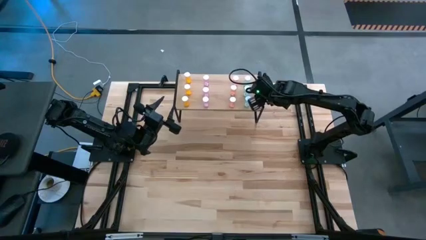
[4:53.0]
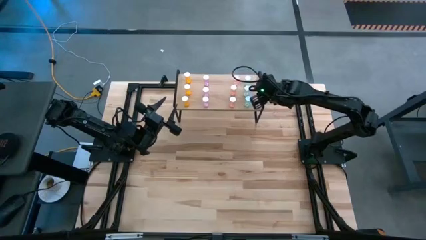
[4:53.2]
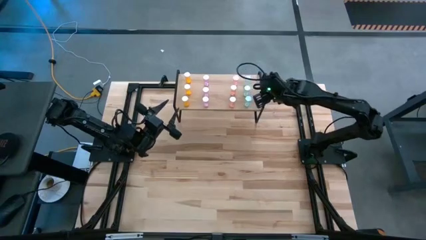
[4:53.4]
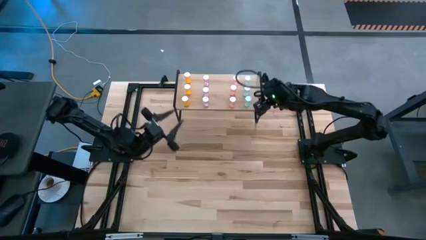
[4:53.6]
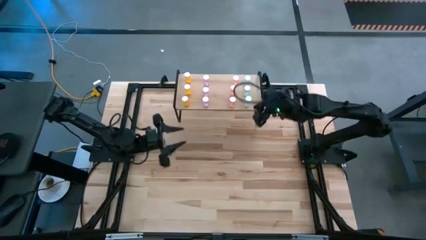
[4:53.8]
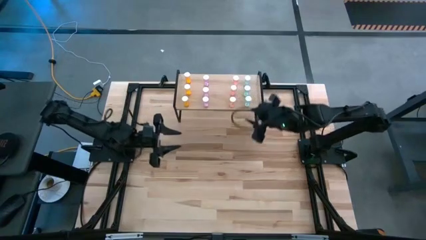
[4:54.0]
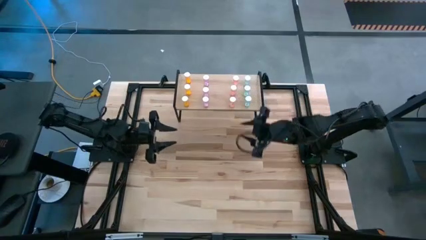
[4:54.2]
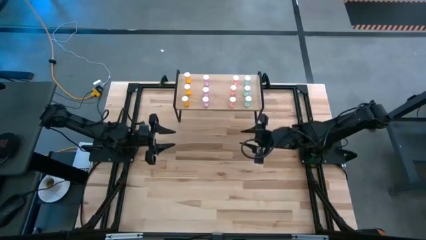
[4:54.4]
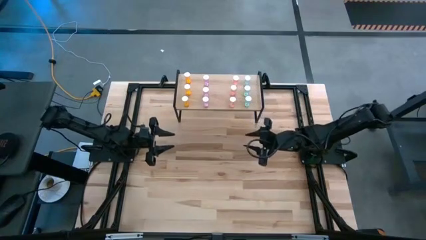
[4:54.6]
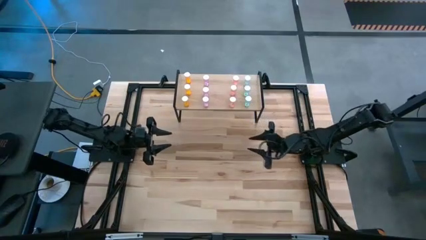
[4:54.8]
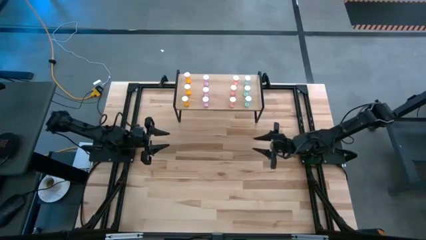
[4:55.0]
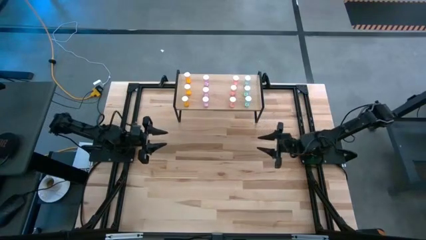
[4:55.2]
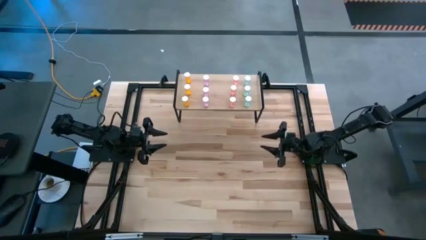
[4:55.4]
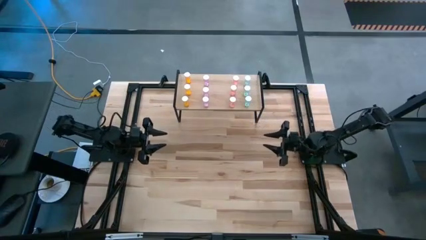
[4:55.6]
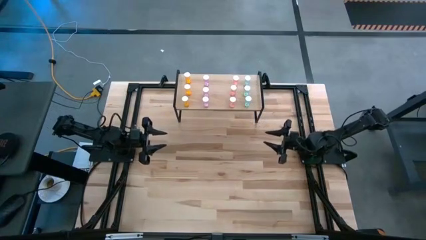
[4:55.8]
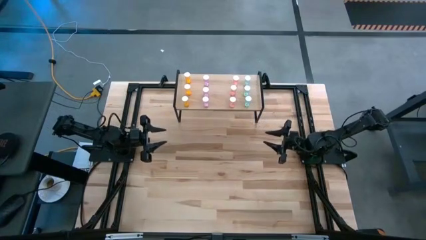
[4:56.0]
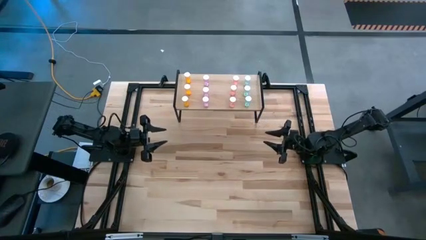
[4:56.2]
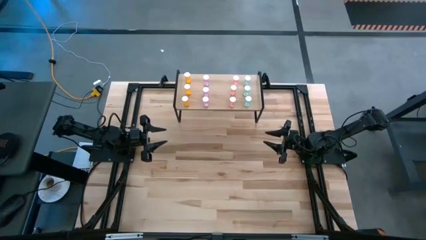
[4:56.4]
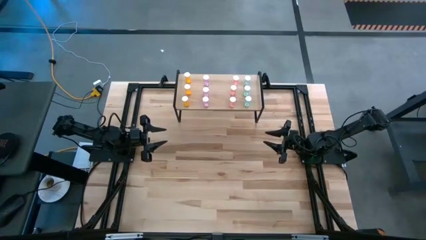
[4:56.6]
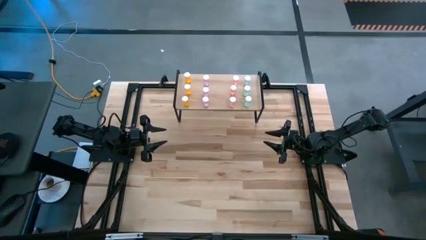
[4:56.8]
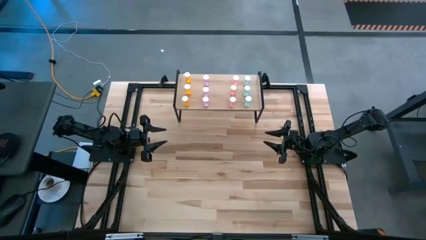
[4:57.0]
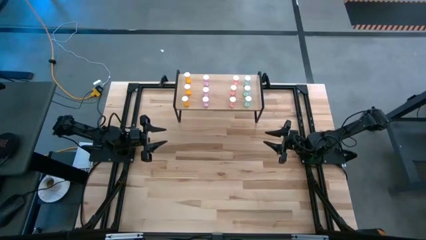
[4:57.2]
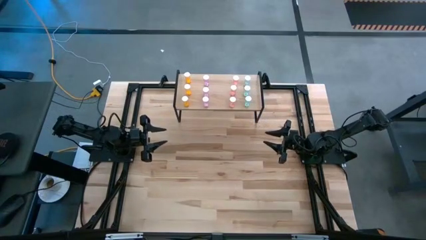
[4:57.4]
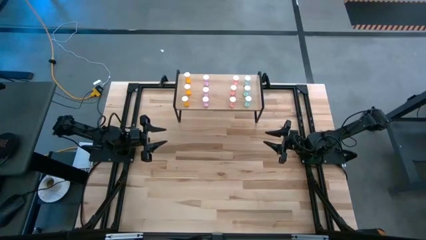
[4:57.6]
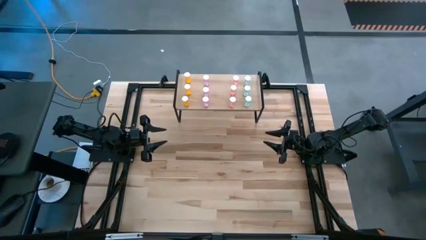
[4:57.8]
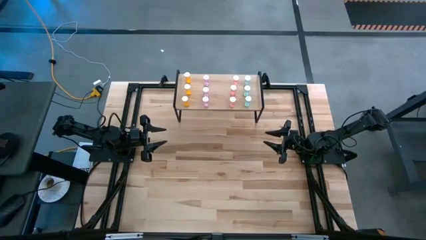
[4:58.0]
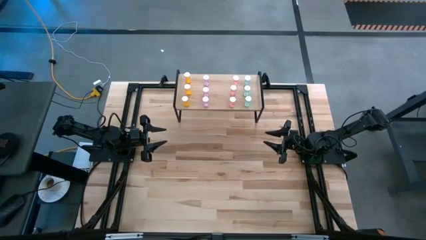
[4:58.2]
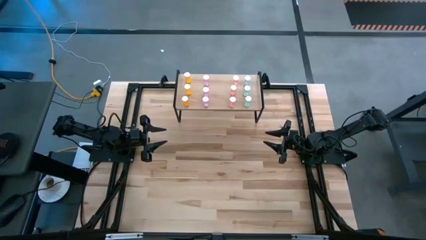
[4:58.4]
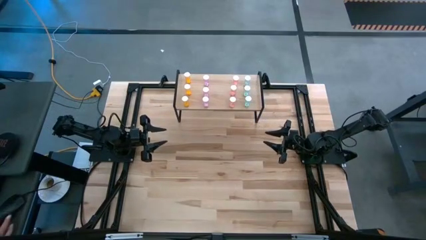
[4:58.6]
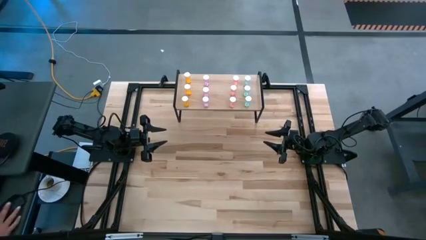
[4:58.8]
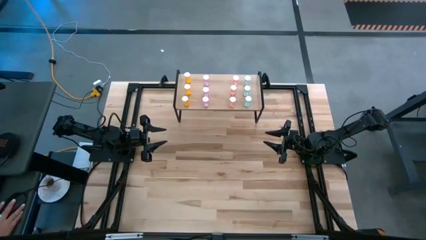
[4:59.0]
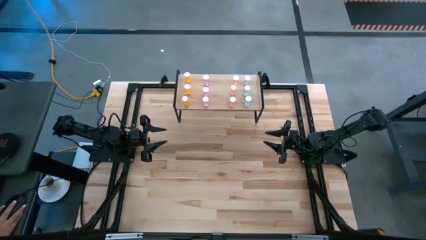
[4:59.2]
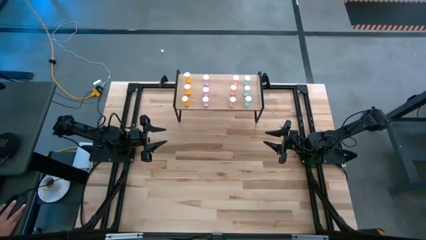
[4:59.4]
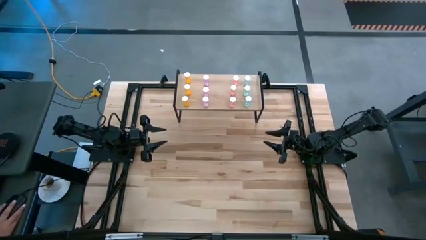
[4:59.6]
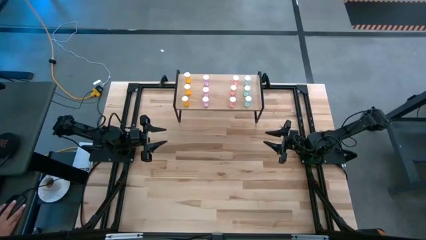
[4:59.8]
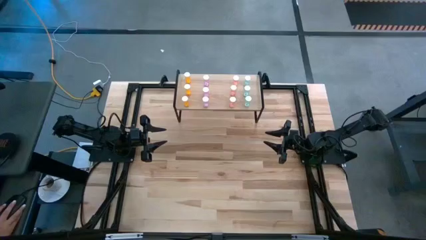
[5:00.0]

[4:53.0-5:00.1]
Task: Pick and place medicine bottles onto shelf by color
Return to Home Position

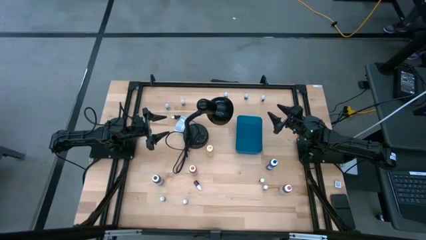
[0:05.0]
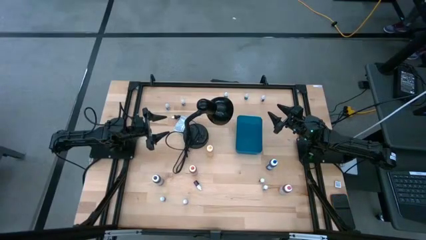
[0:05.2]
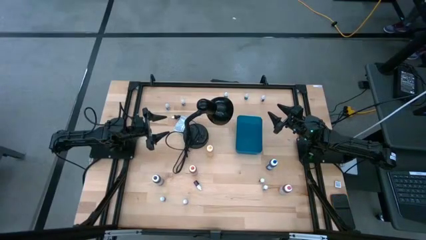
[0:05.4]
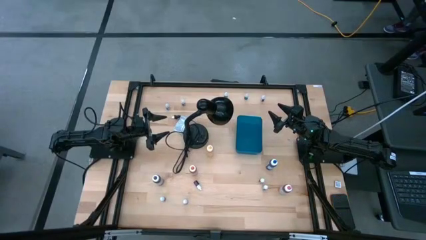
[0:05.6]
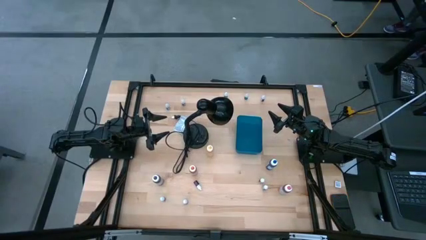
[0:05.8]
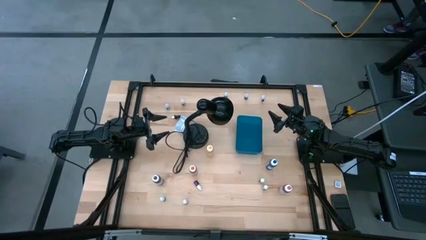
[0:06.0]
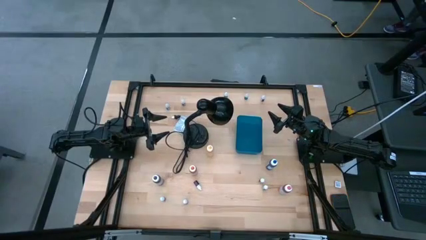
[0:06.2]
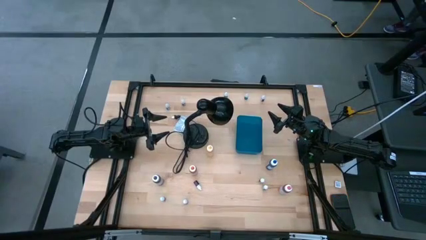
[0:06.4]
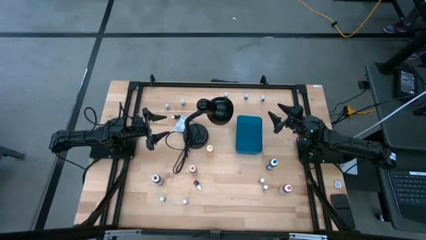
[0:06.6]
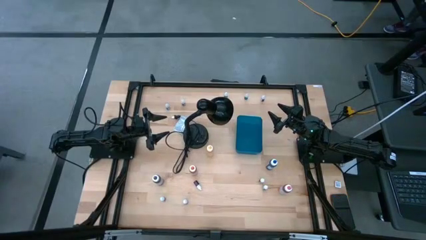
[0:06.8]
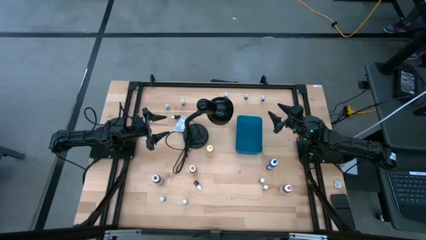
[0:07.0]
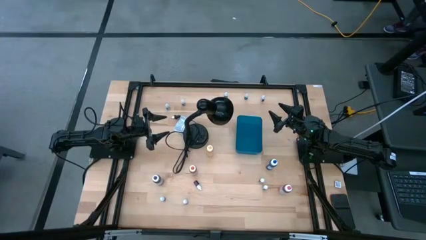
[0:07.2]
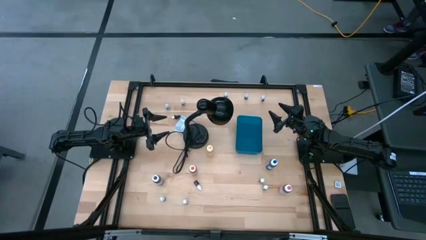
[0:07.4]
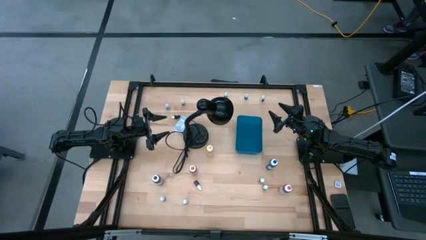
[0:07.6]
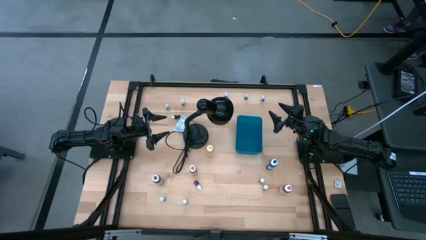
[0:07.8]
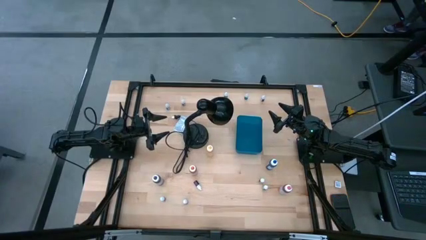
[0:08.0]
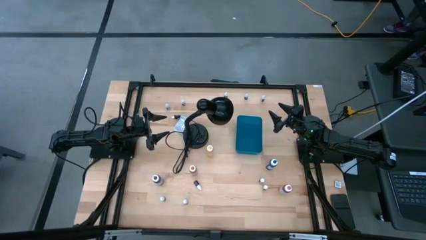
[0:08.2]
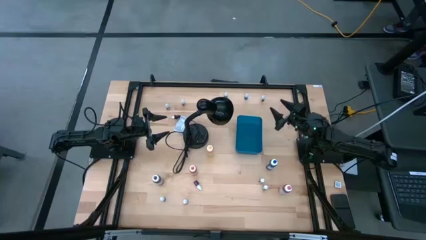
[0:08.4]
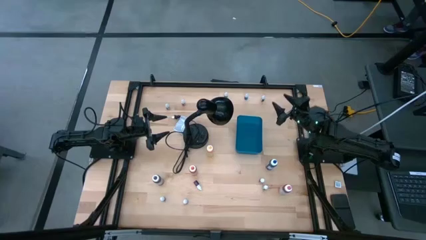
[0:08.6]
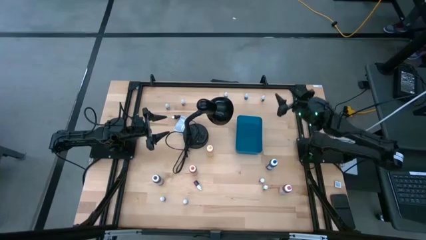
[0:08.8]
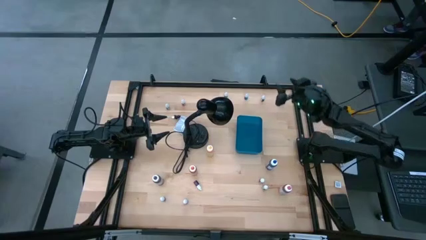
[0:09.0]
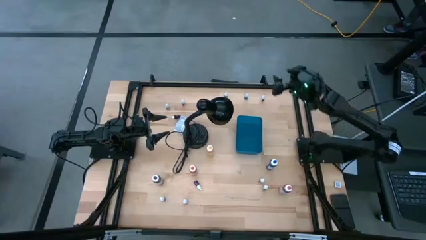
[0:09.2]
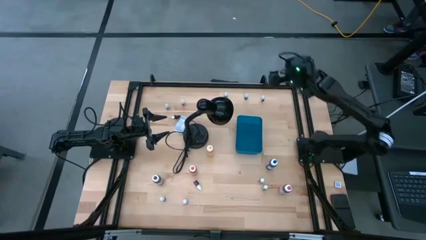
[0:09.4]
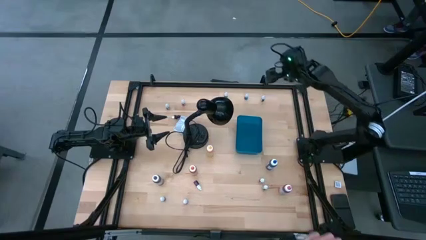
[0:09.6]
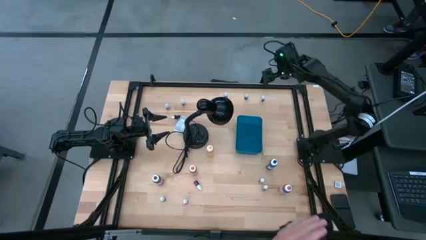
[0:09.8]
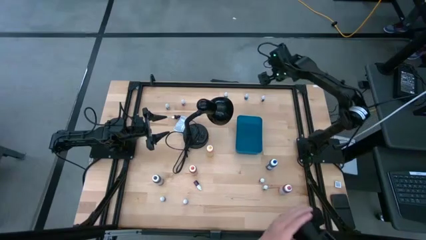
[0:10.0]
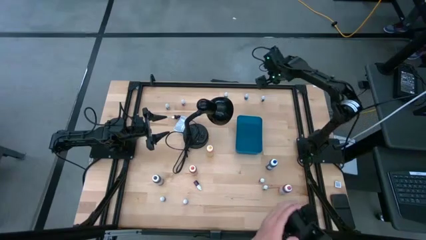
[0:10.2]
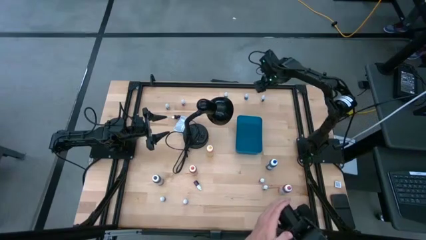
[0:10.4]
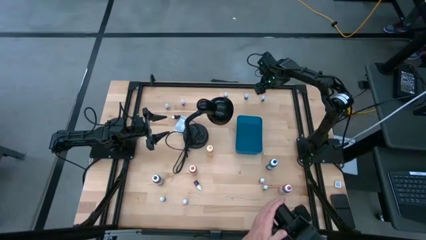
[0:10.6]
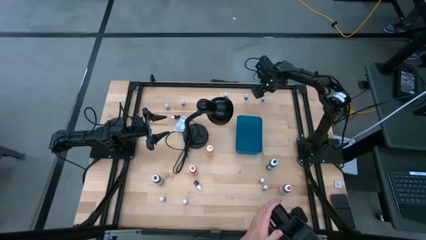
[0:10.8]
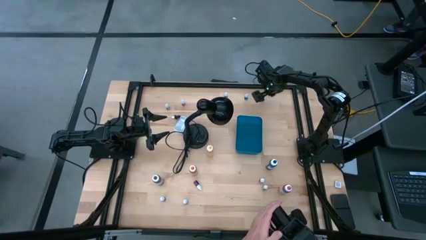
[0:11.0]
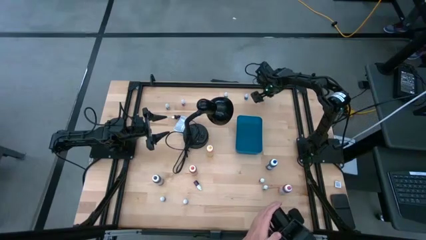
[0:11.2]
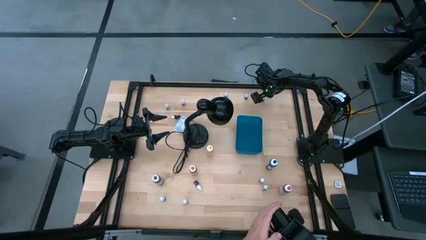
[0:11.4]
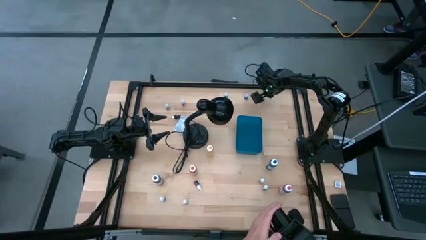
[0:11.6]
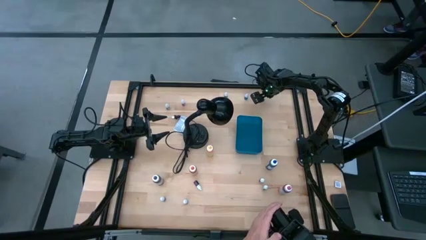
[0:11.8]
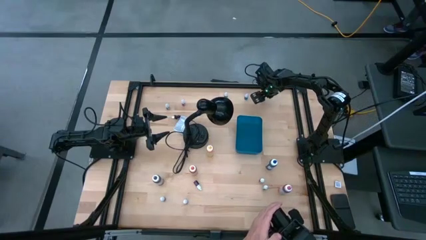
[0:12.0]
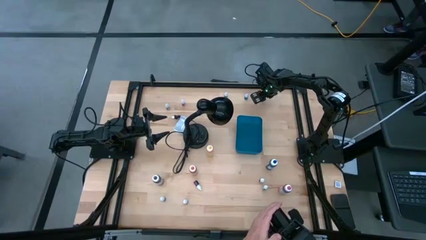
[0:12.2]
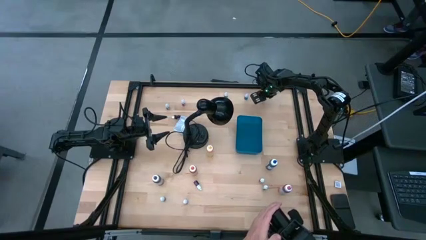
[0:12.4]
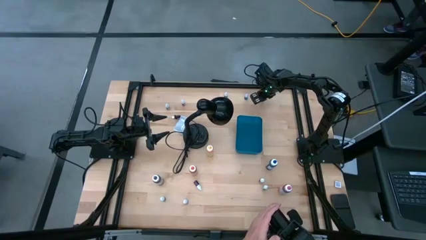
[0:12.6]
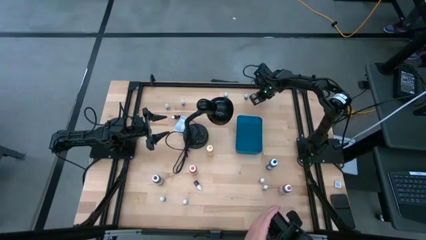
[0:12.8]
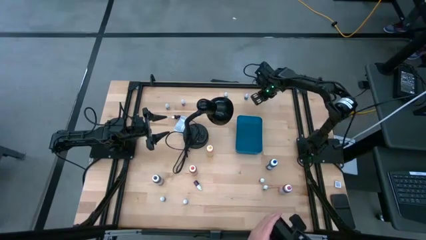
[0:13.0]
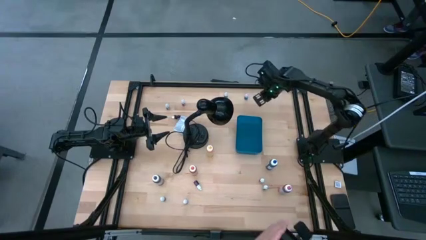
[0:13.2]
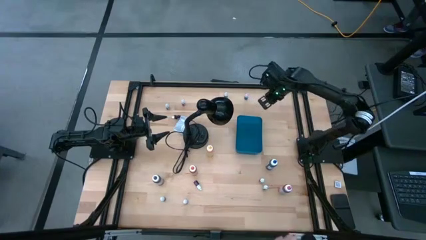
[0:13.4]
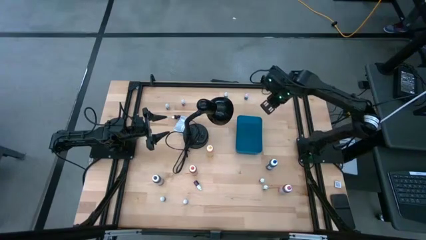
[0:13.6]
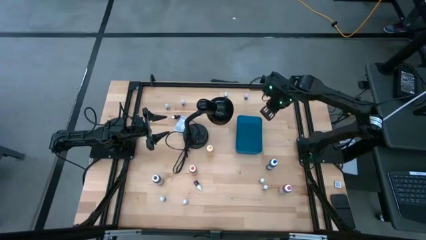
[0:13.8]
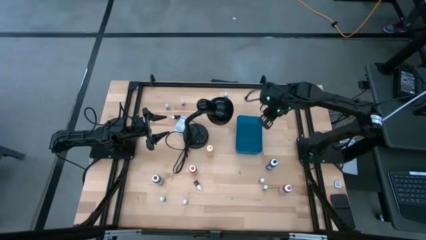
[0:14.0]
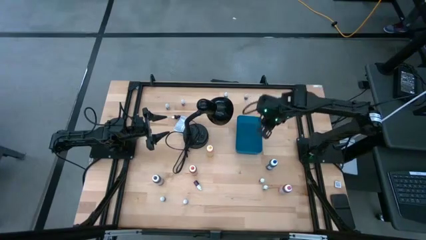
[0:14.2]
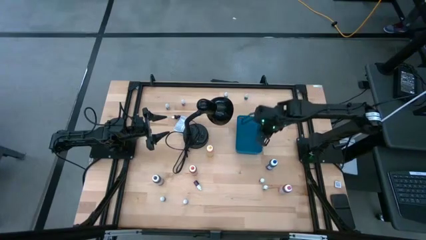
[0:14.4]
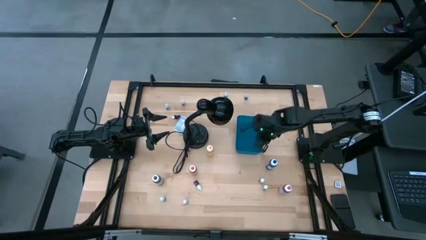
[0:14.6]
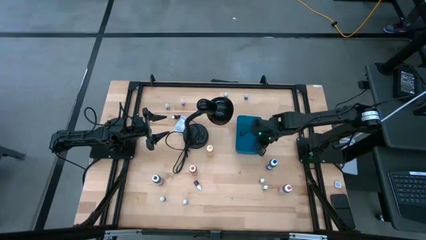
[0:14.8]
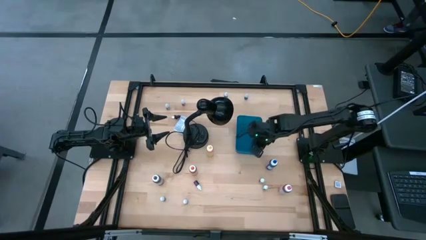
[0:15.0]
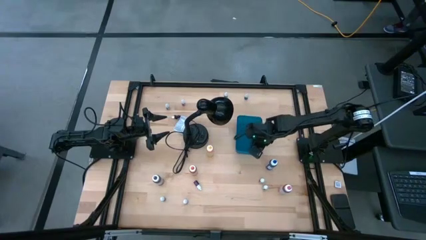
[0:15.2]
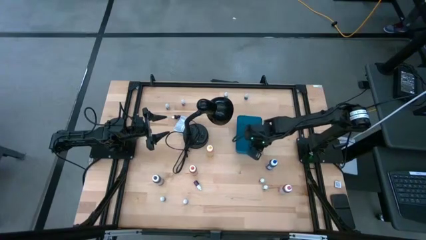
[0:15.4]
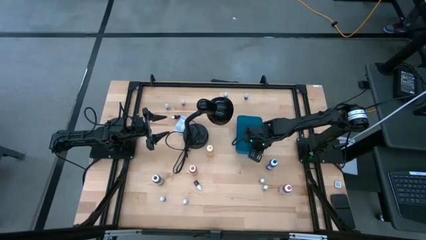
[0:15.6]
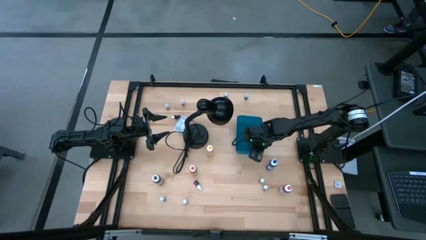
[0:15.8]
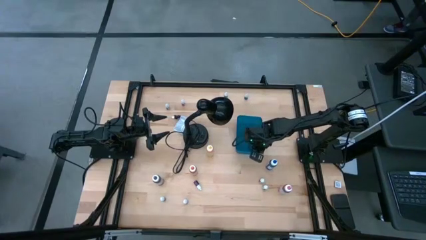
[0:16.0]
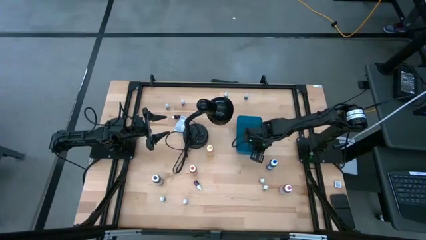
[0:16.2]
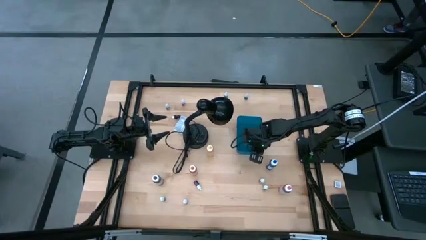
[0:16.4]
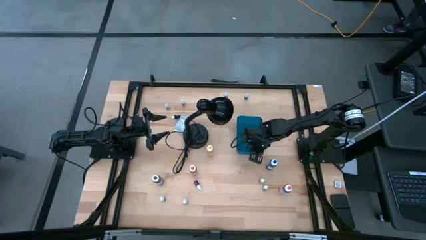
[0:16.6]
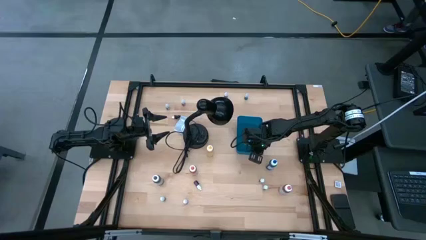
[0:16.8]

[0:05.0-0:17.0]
Task: Pick & Place food coloring
Put the small red food coloring bottle into the blue bin
